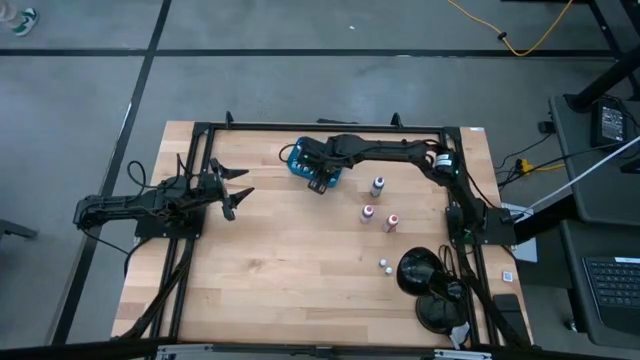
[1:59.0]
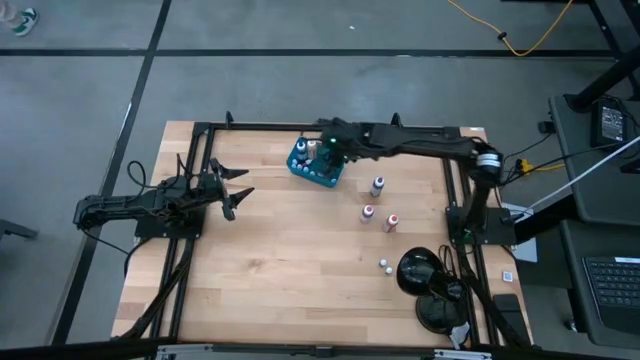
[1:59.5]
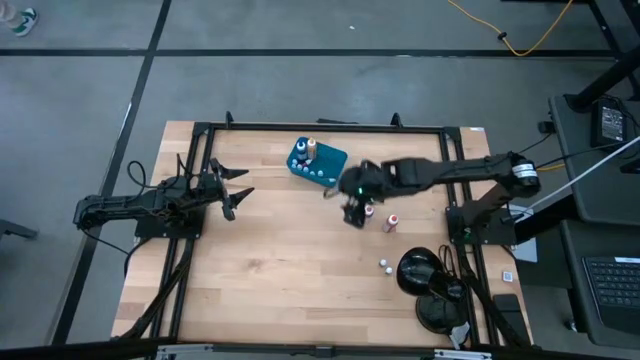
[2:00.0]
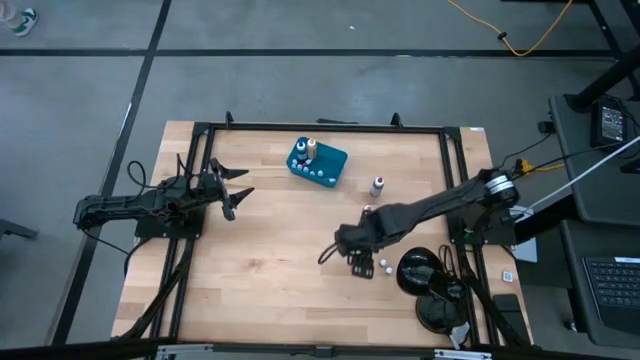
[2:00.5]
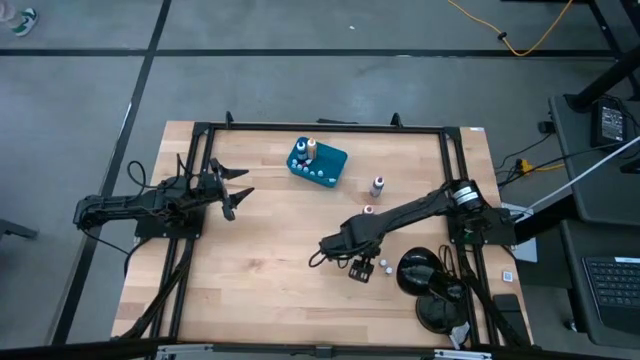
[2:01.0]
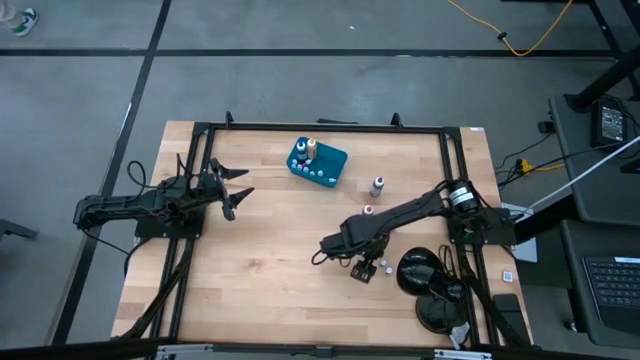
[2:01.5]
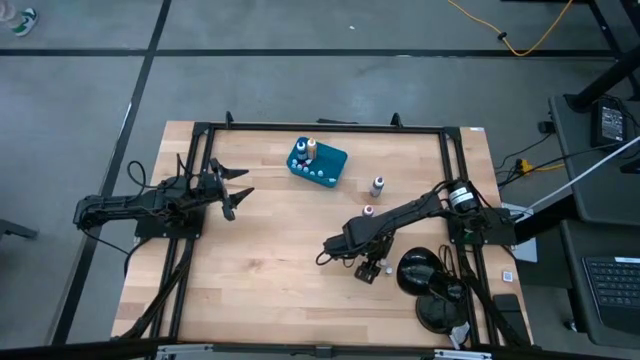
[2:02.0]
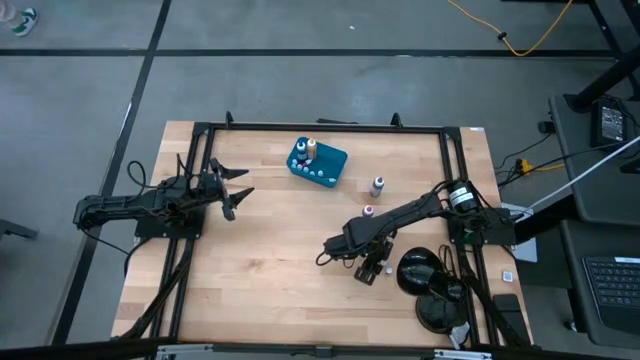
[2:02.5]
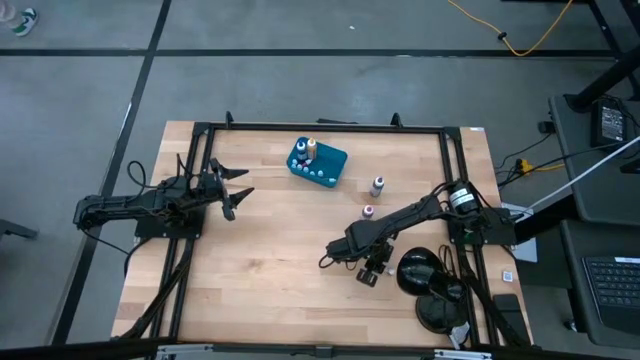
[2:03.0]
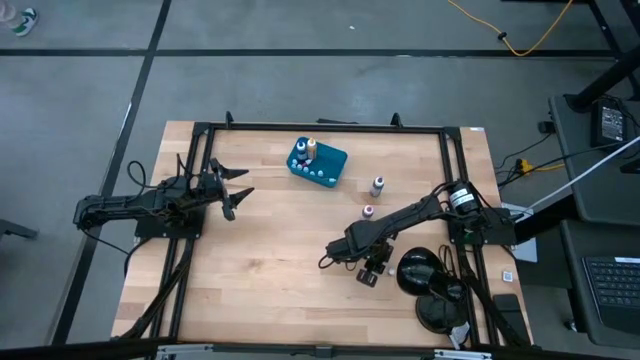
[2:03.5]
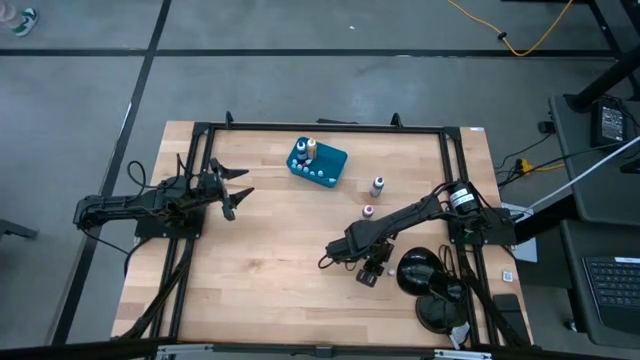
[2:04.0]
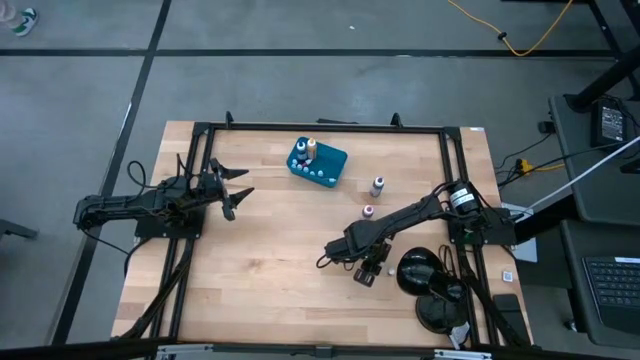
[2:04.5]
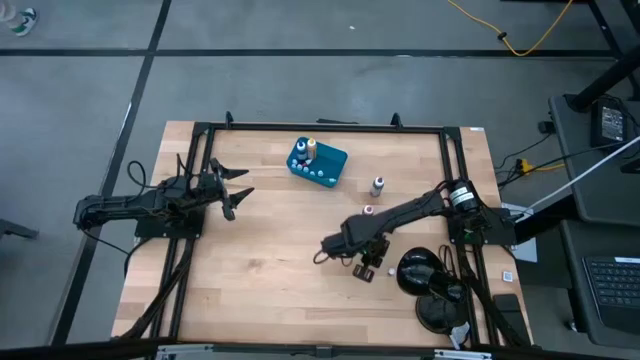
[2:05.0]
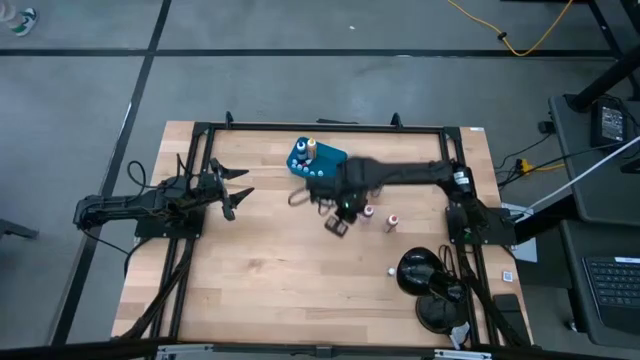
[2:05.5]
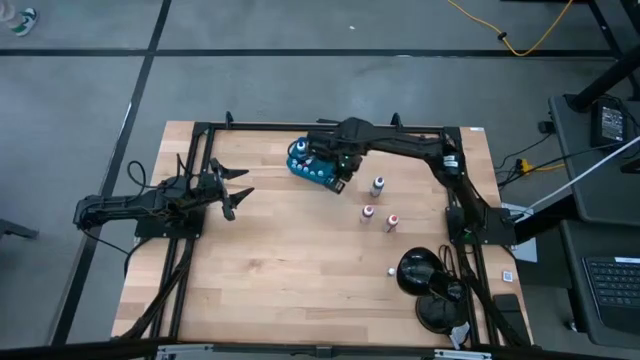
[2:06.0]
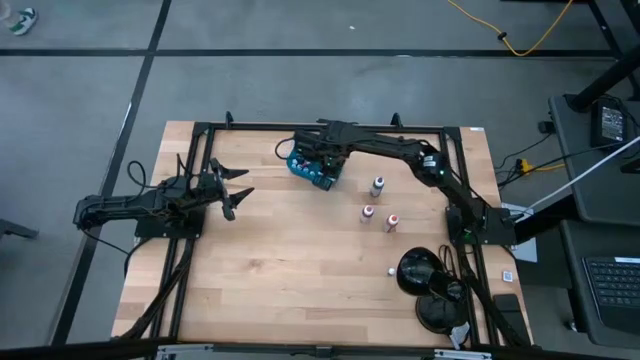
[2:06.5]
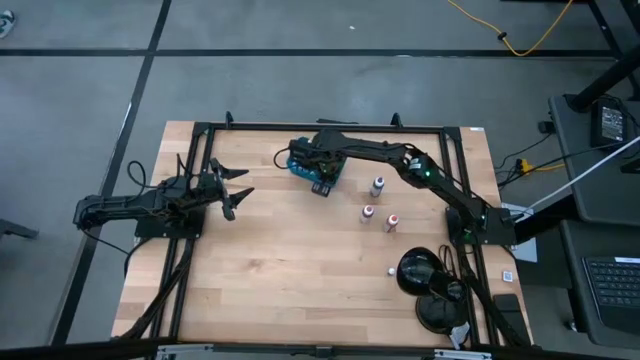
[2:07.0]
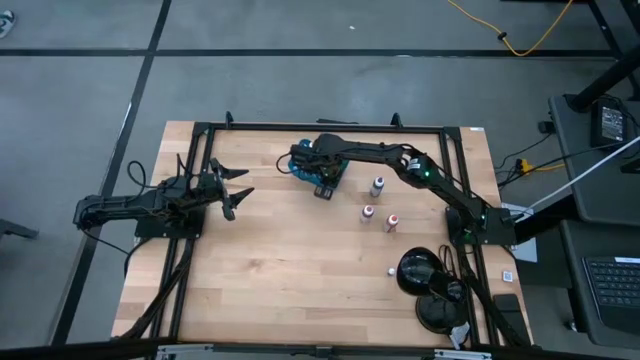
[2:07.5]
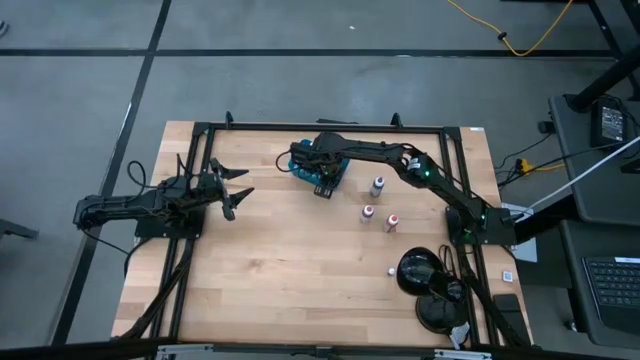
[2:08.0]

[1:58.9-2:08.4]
Task: Pick & Place food coloring
Put the small black food coloring bottle into the blue bin

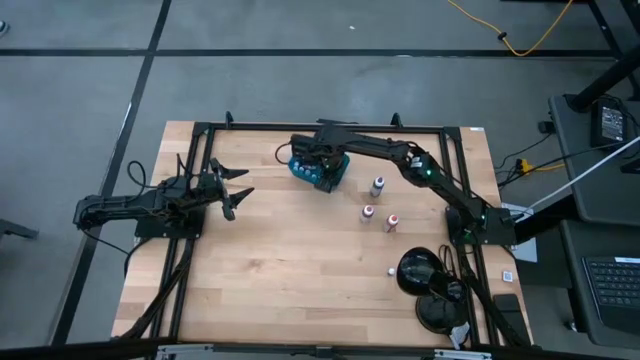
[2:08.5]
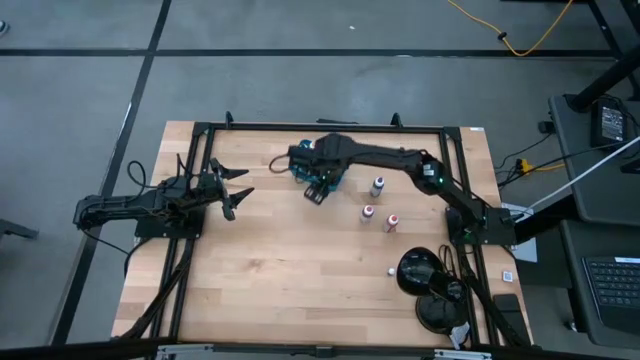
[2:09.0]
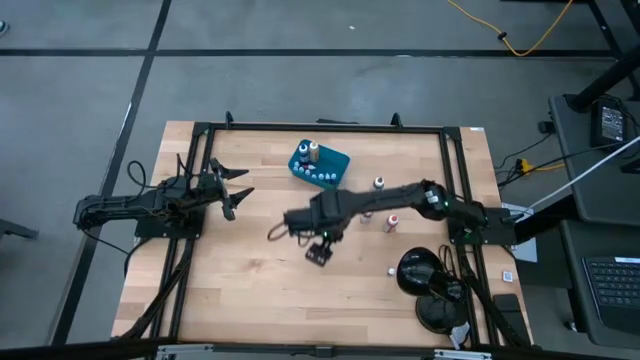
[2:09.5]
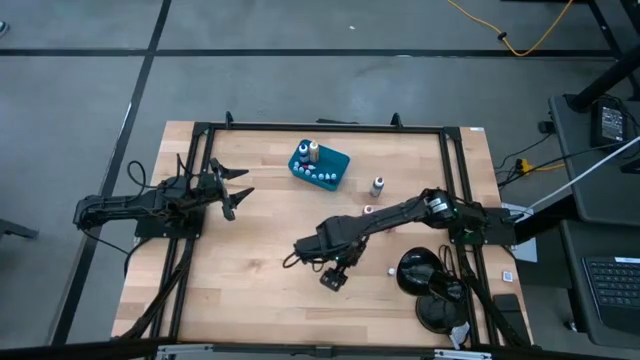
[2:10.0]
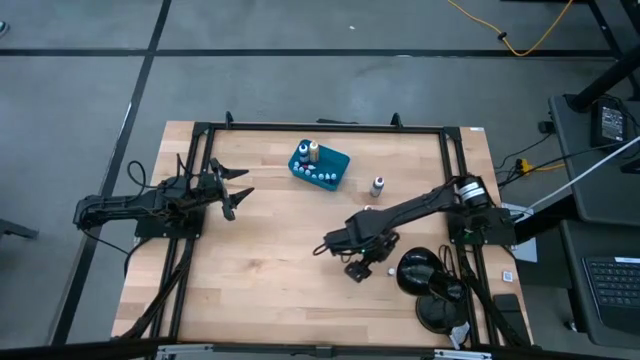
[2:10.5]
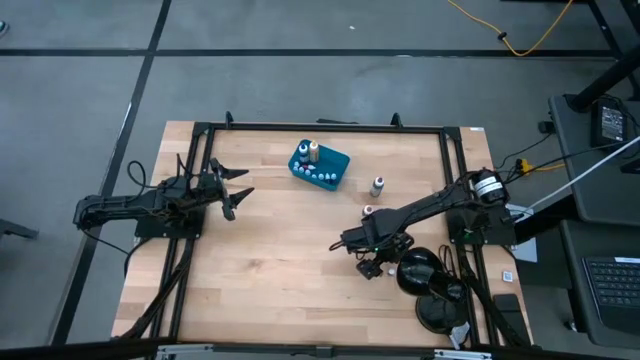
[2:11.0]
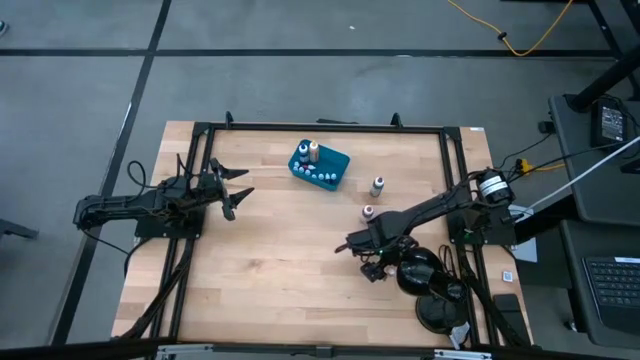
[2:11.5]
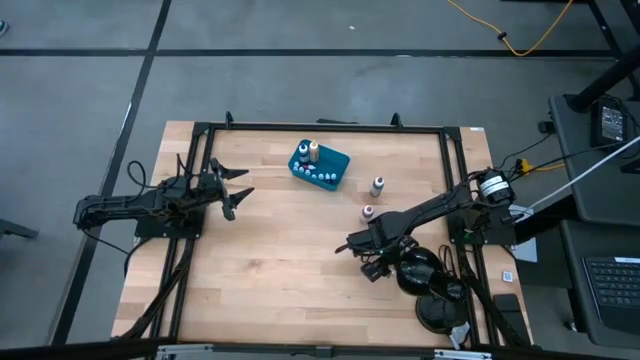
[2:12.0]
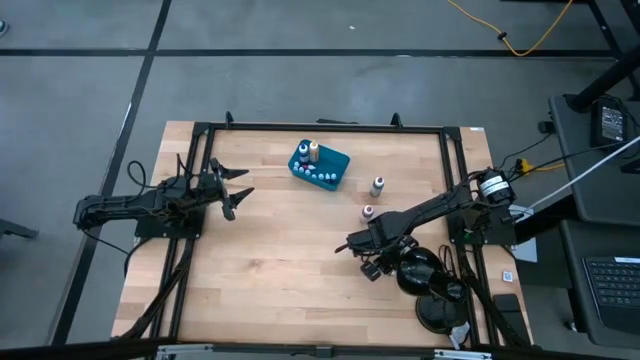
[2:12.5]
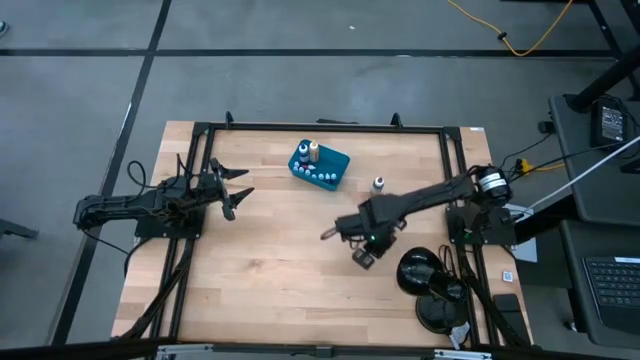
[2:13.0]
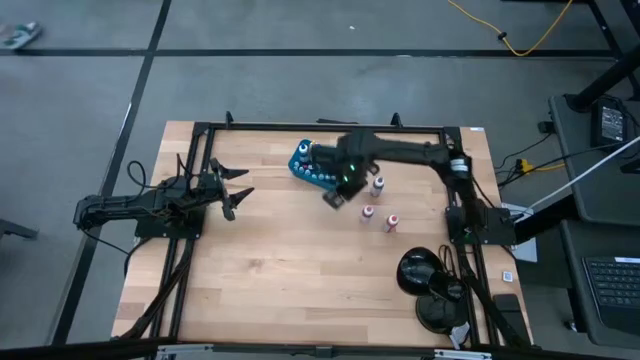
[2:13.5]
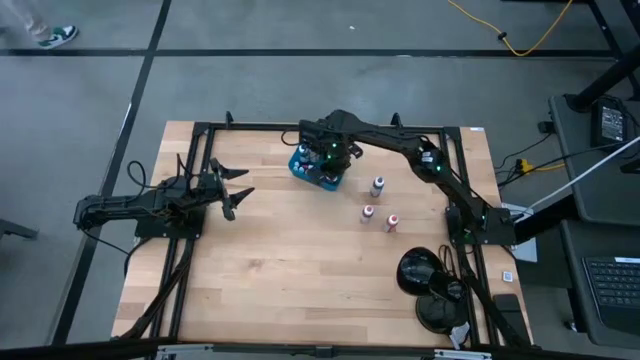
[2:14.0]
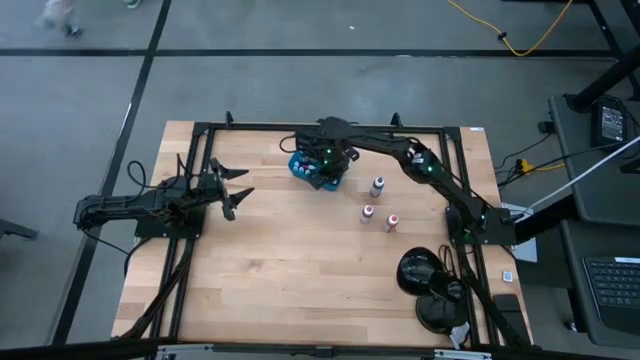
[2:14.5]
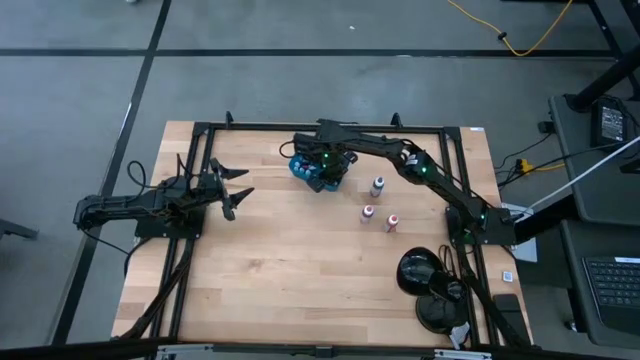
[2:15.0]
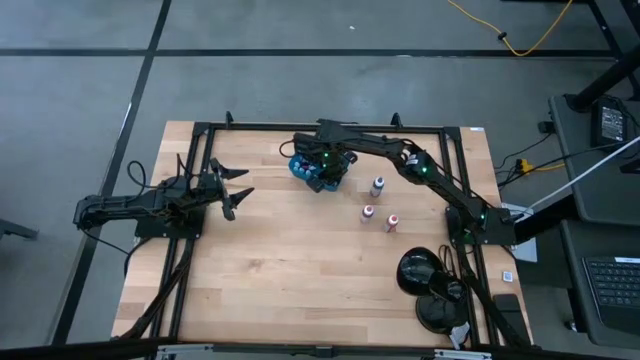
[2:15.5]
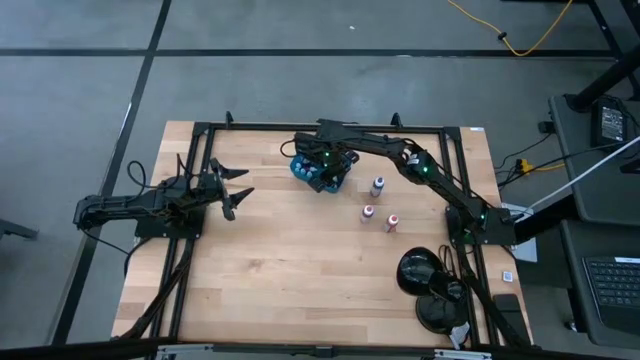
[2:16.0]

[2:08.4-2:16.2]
Put the small red food coloring bottle into the blue bin

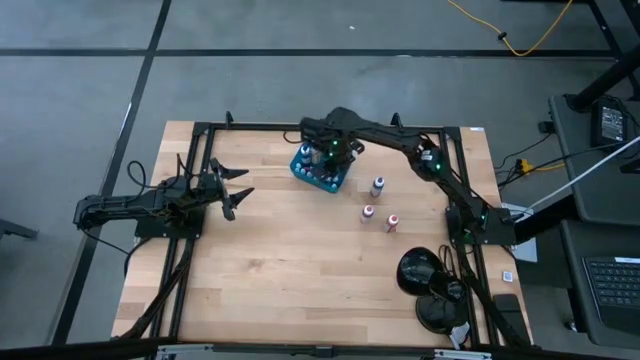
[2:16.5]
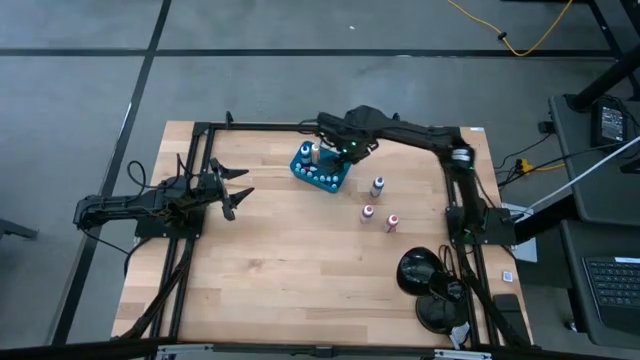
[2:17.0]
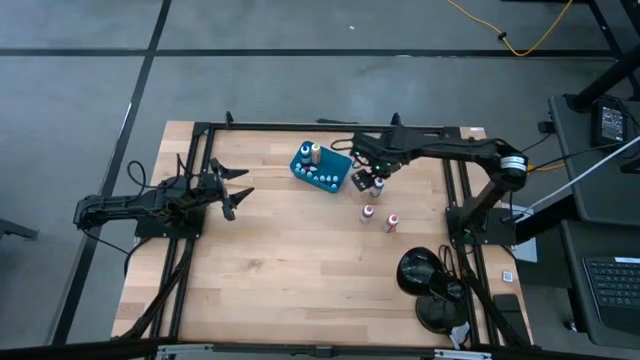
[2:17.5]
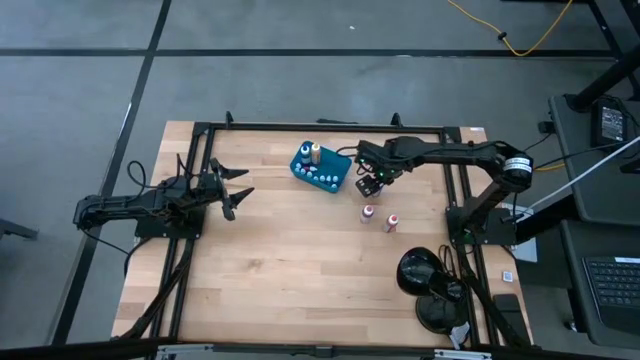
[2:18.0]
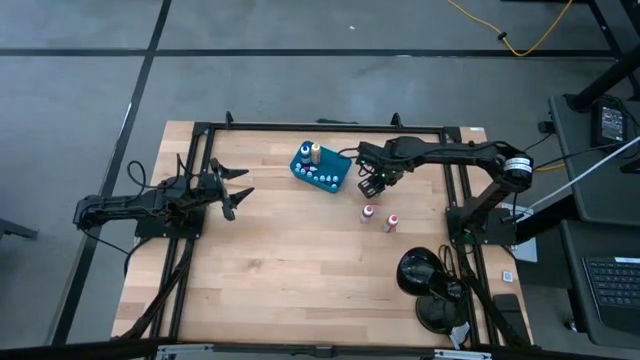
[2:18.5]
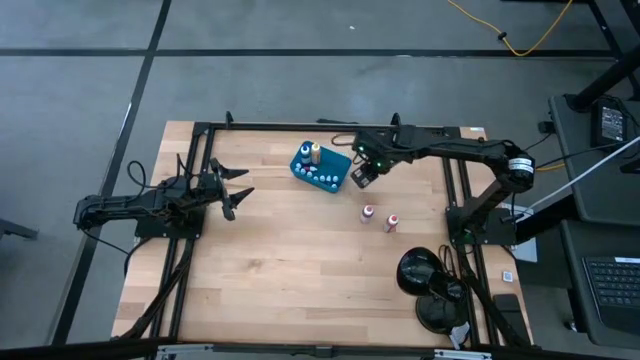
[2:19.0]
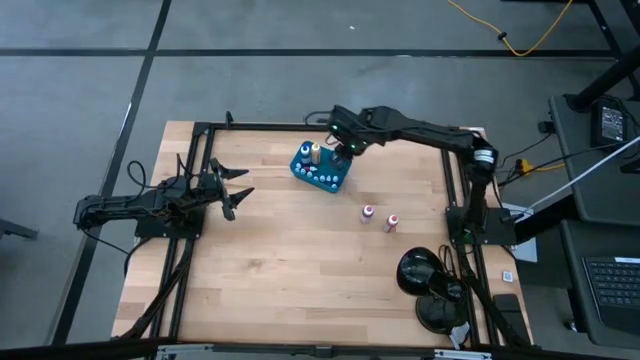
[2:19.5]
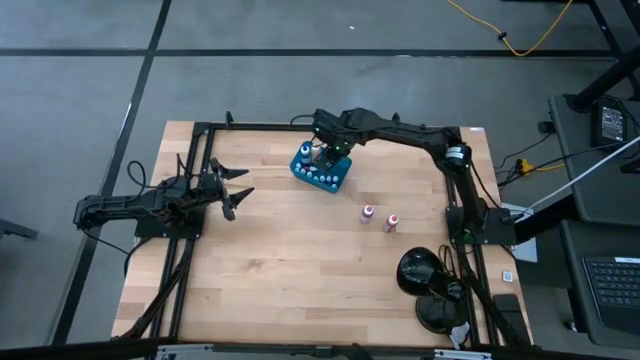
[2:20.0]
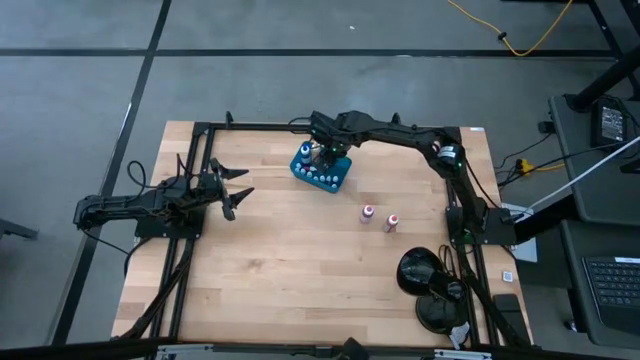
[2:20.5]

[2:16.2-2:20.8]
Put the large purple food coloring bottle into the blue bin

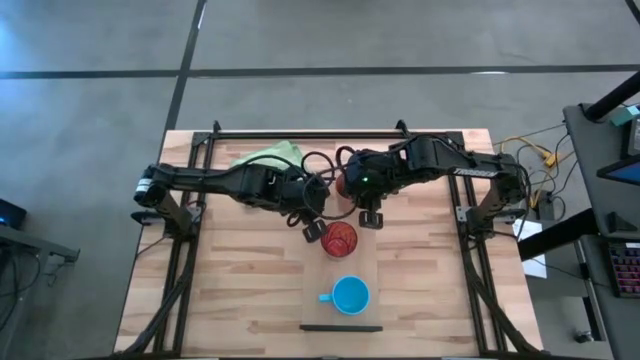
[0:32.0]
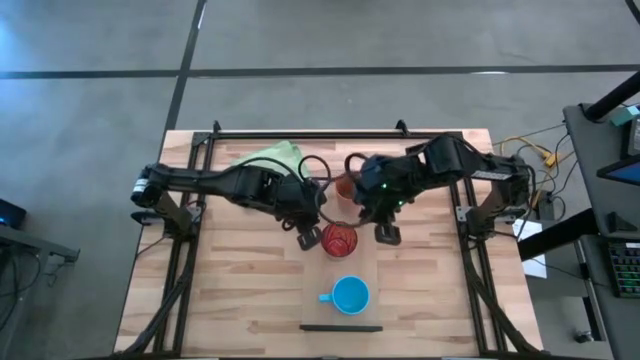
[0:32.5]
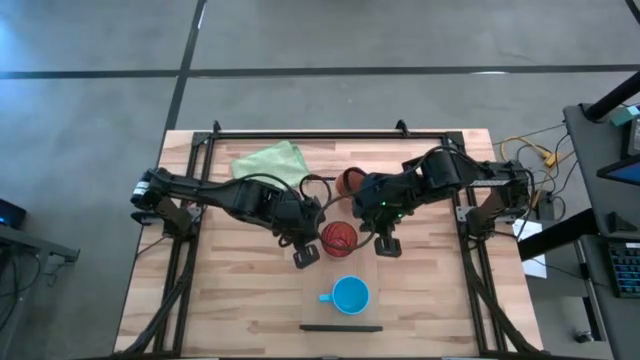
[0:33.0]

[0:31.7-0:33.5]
Task: Stack small to large cups/mugs on shelf
Adjust the orange cup on the shelf
